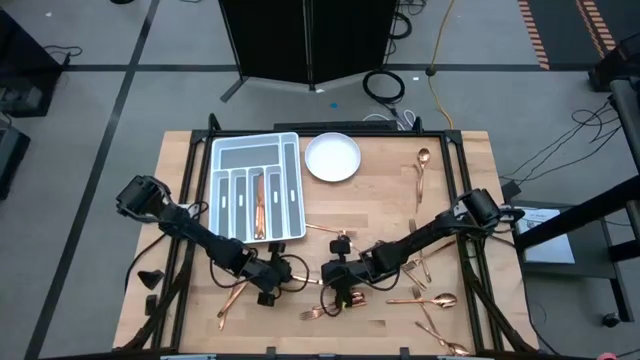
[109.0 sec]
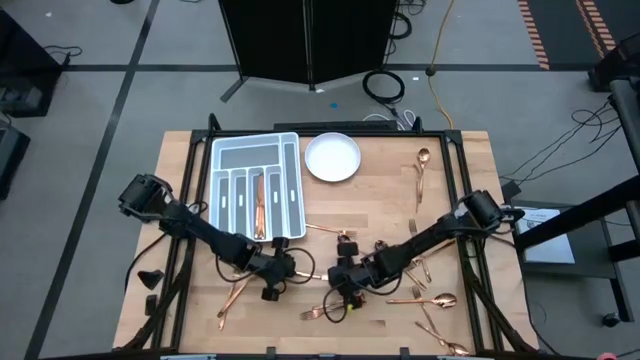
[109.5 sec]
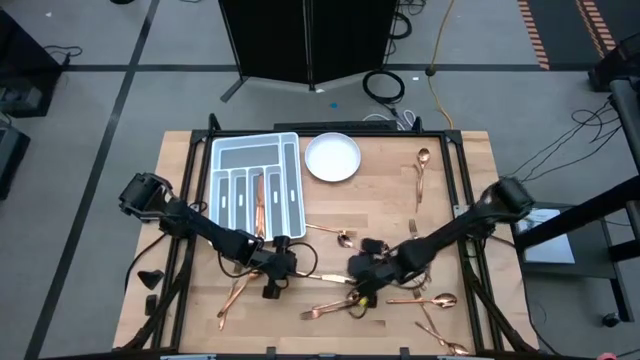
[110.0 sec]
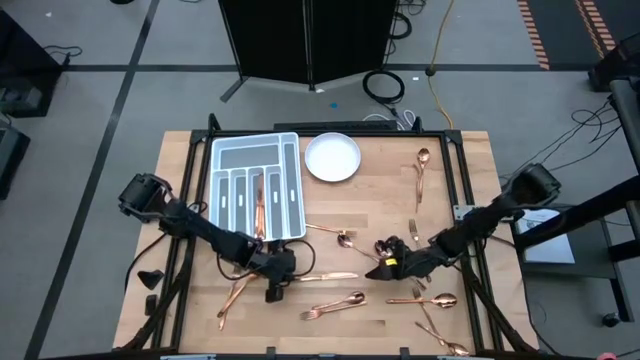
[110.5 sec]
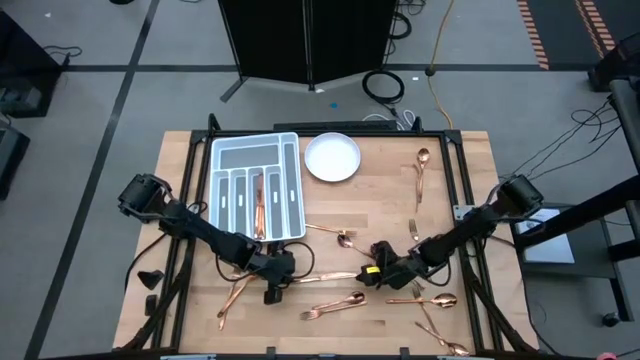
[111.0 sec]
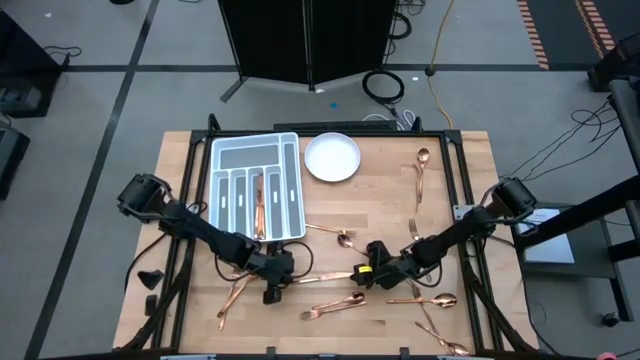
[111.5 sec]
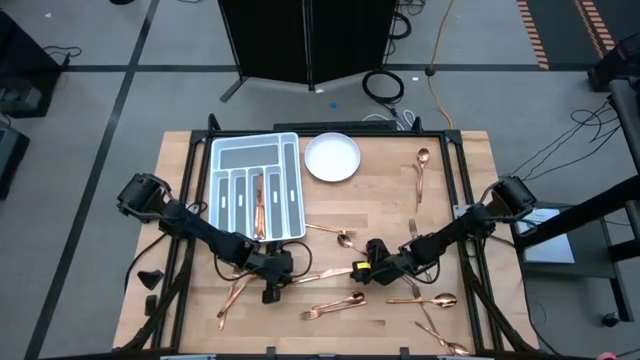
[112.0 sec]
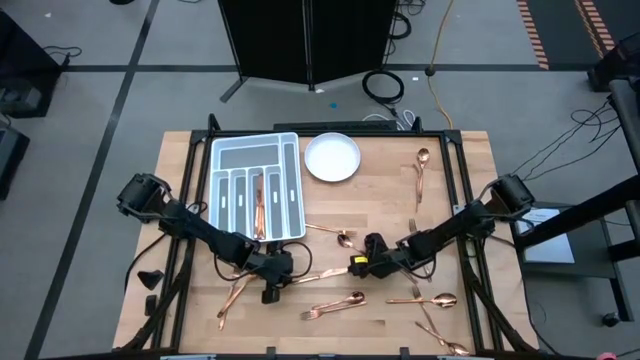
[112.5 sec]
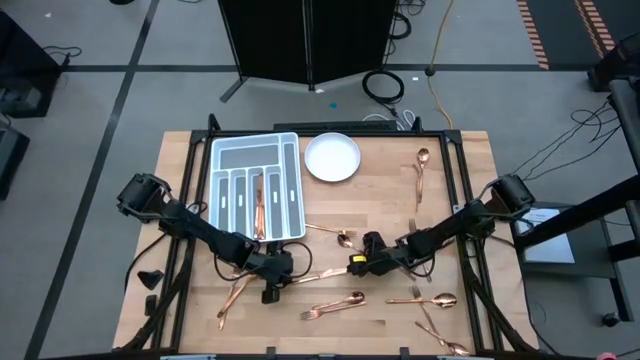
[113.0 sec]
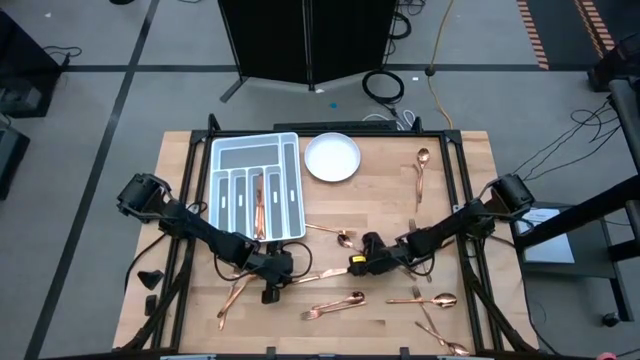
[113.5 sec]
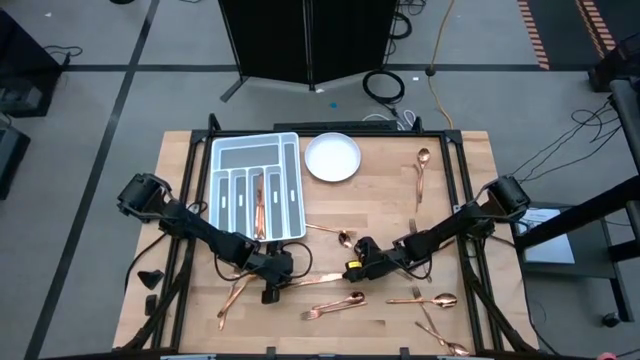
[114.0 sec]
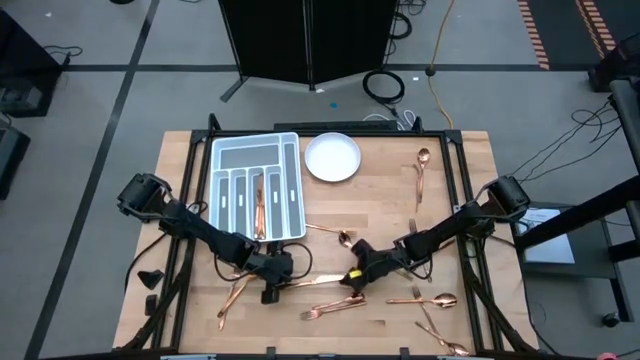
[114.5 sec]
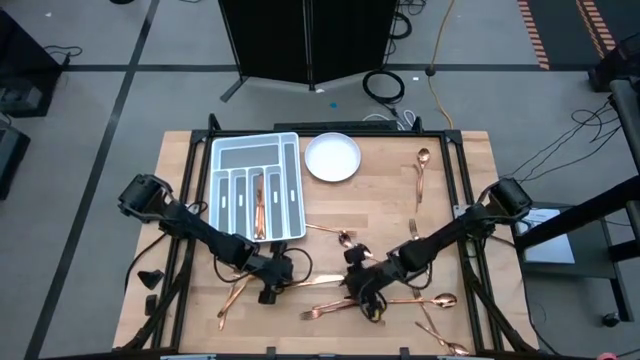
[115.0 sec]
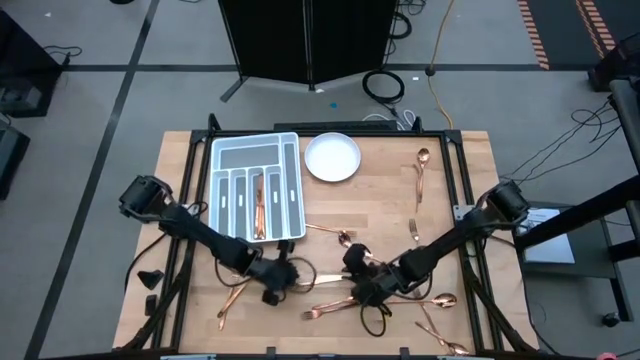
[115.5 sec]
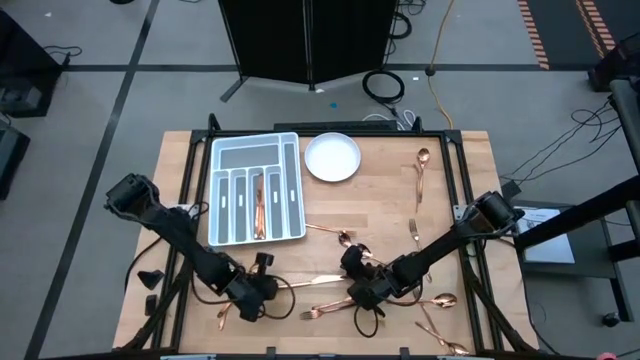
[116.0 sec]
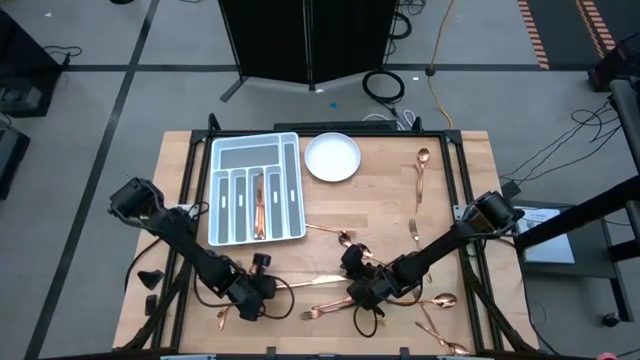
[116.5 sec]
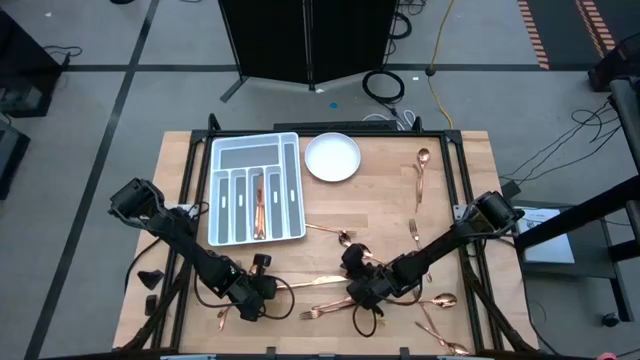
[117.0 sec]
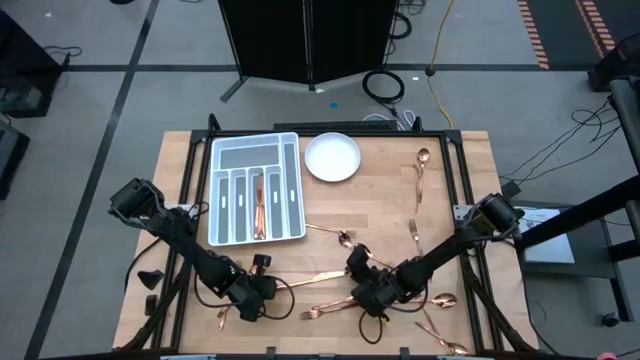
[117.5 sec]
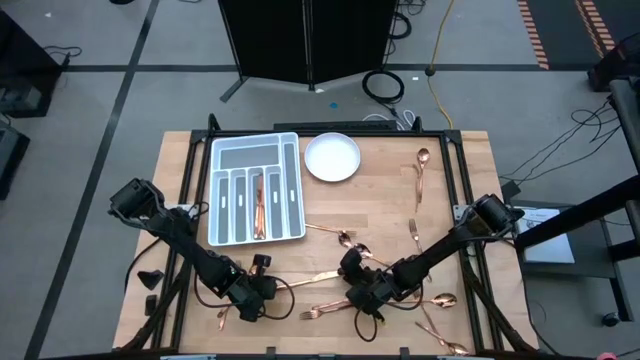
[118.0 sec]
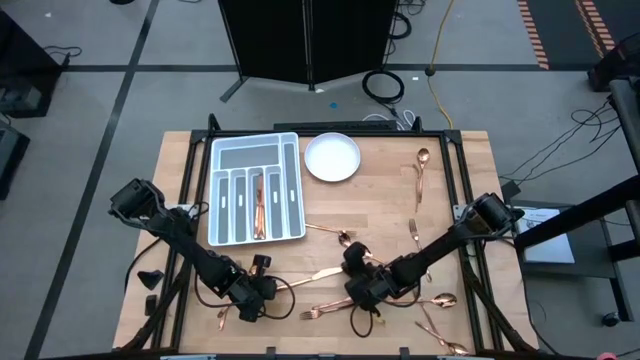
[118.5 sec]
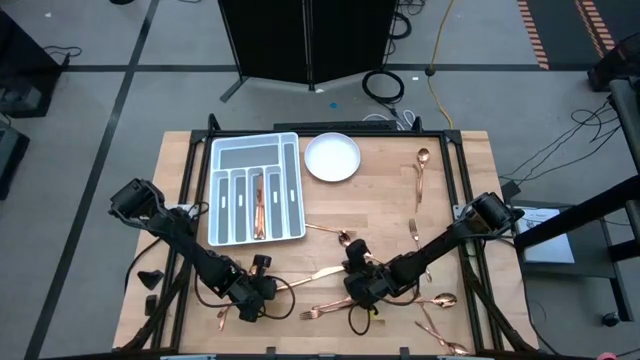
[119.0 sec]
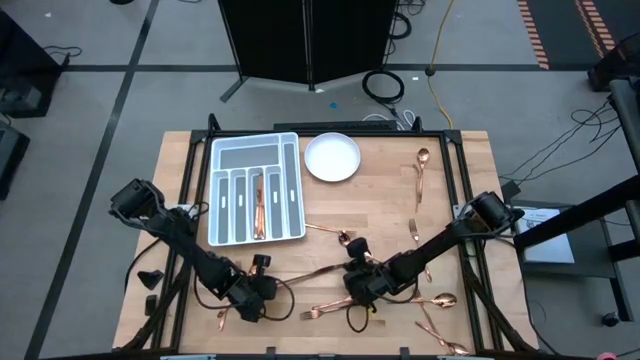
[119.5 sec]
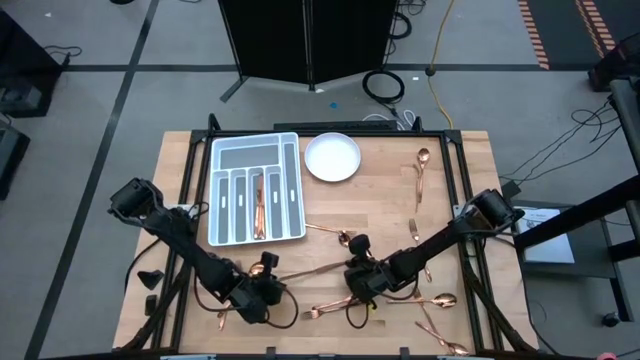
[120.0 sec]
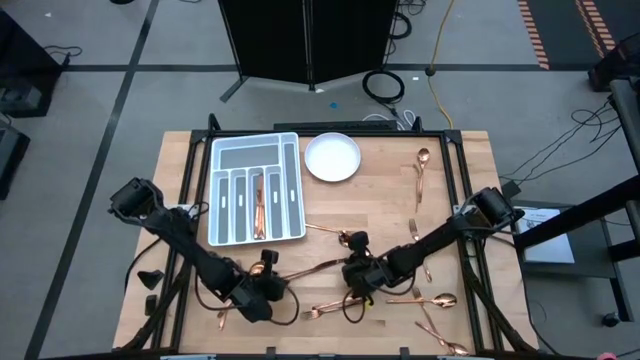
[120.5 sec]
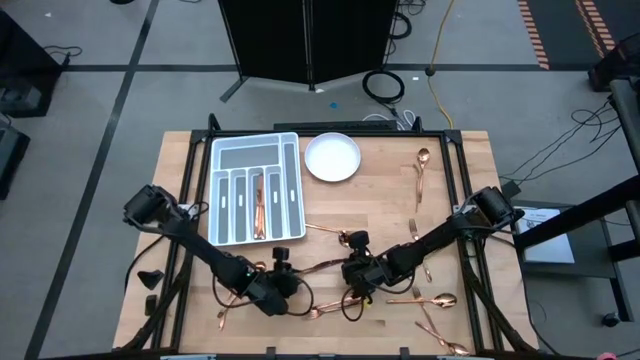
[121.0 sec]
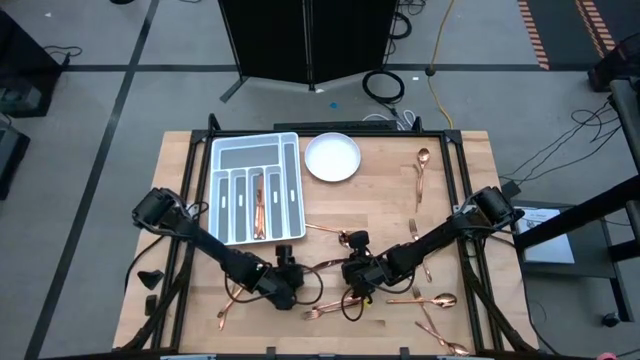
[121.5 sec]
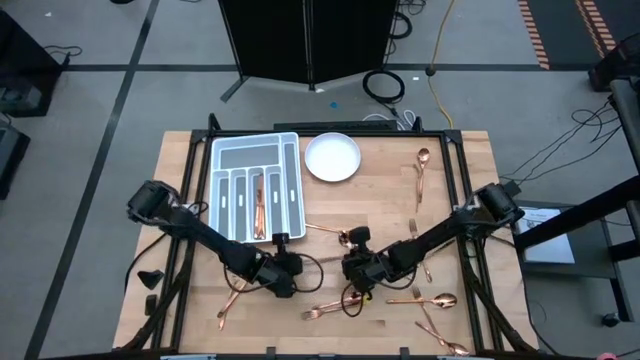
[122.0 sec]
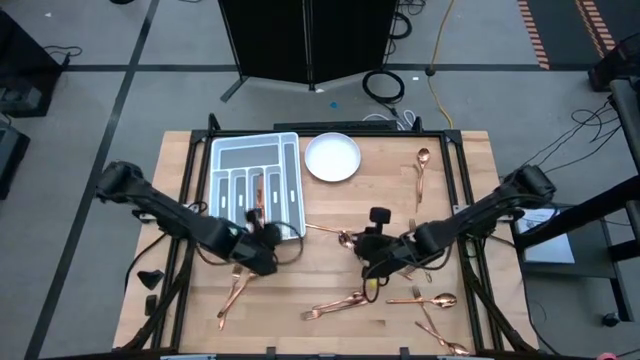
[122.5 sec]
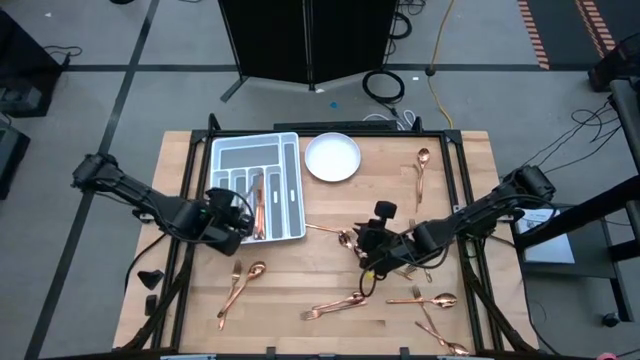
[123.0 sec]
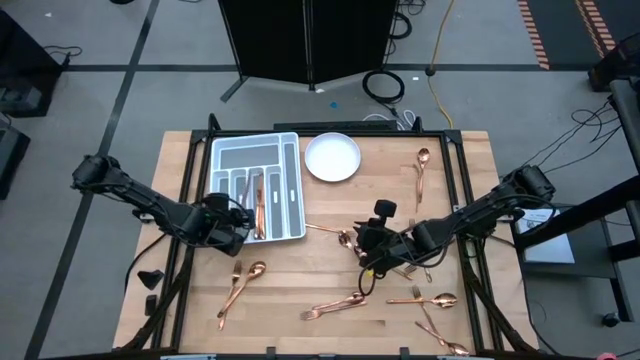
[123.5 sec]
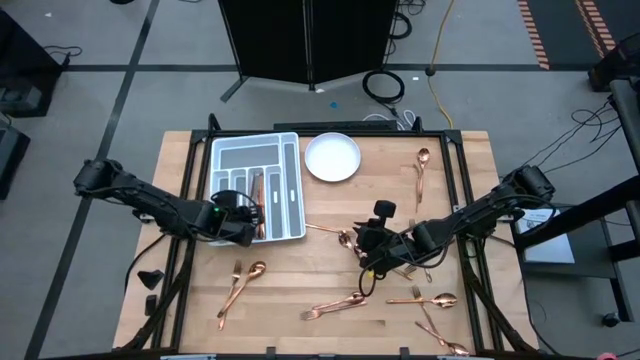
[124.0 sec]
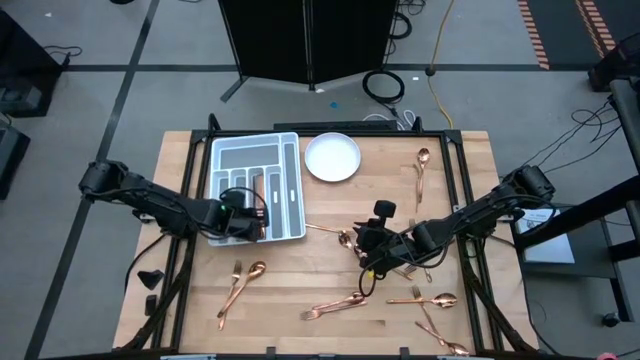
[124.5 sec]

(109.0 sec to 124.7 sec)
Task: Sort silverware
Put the knife on the silverware tray
